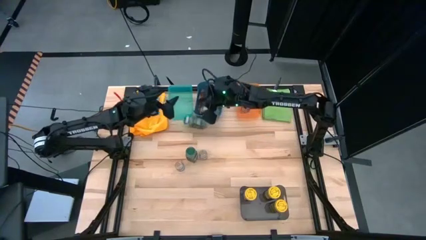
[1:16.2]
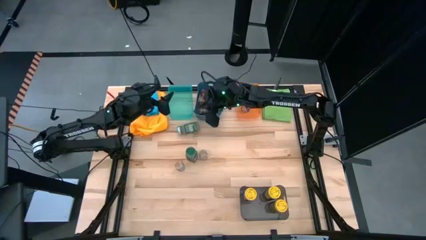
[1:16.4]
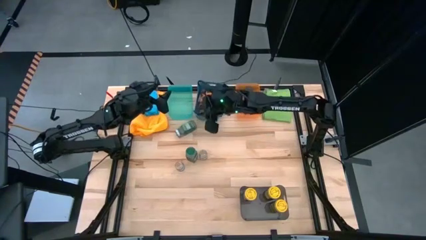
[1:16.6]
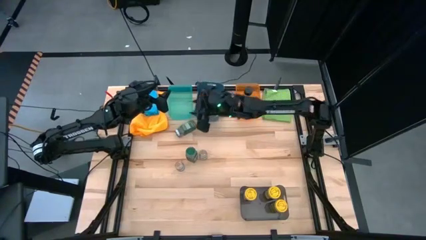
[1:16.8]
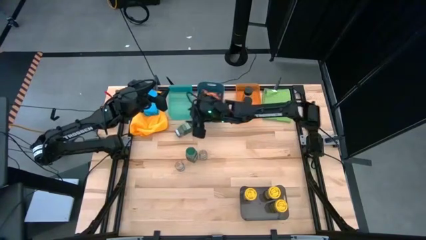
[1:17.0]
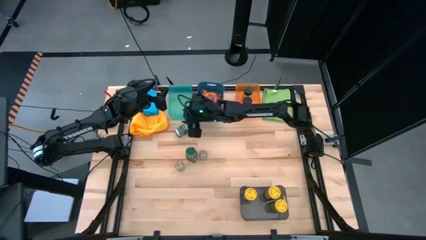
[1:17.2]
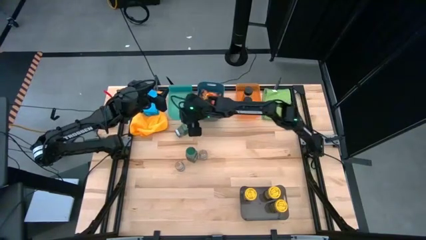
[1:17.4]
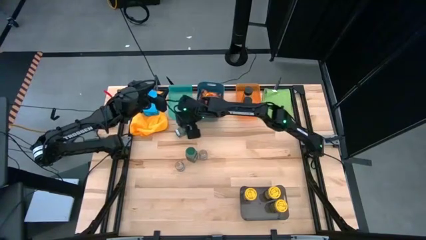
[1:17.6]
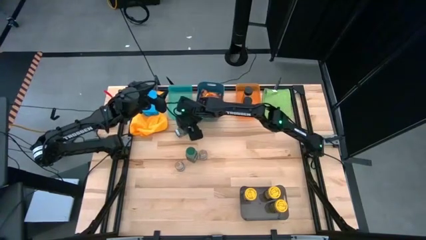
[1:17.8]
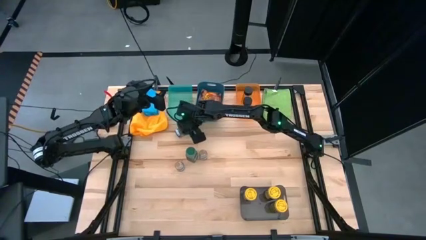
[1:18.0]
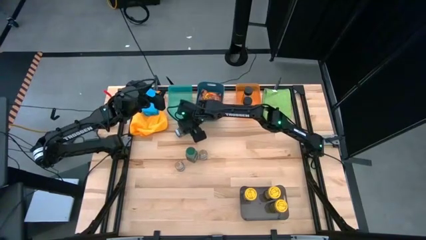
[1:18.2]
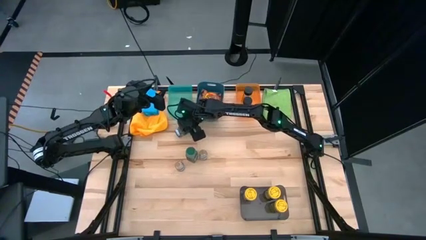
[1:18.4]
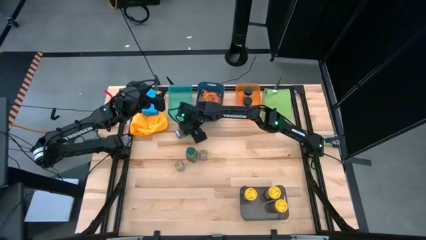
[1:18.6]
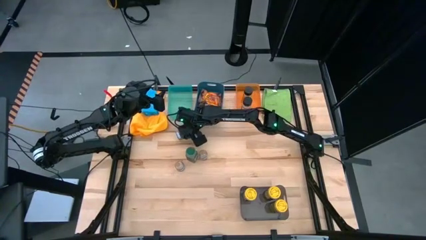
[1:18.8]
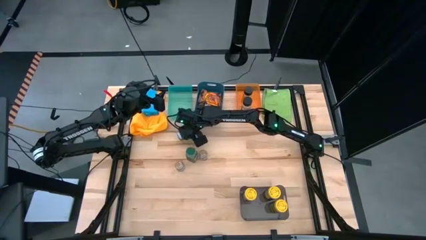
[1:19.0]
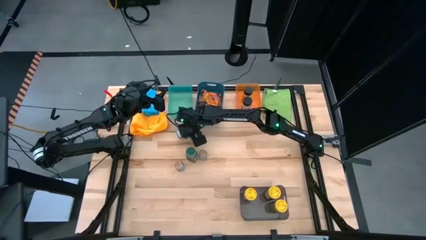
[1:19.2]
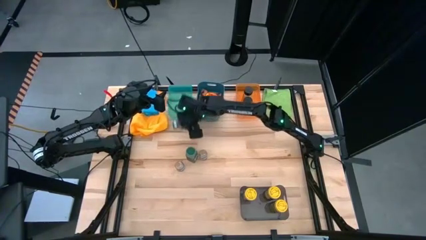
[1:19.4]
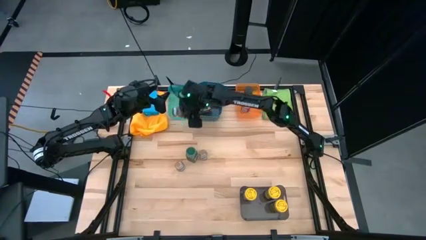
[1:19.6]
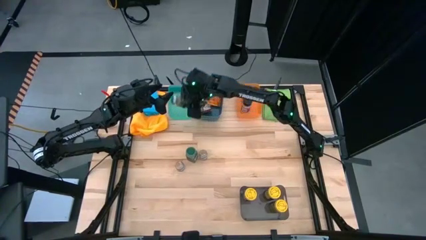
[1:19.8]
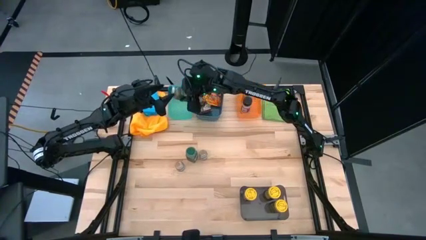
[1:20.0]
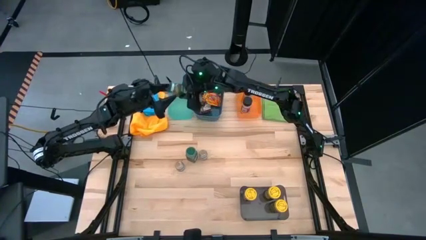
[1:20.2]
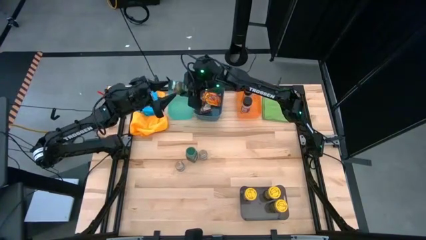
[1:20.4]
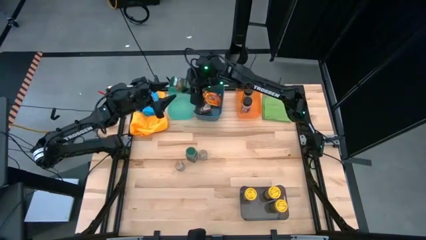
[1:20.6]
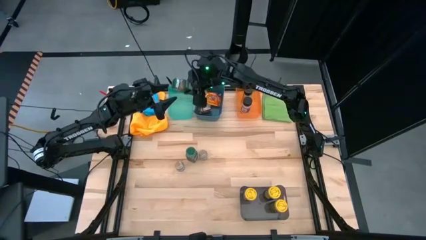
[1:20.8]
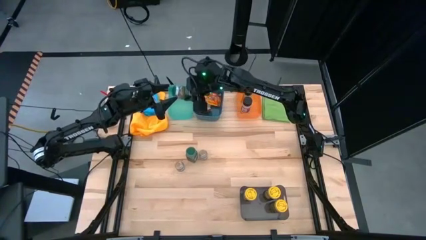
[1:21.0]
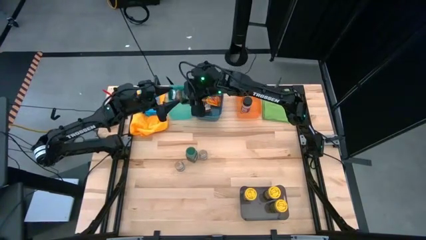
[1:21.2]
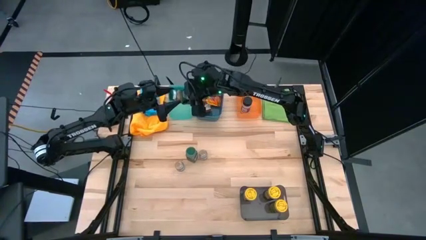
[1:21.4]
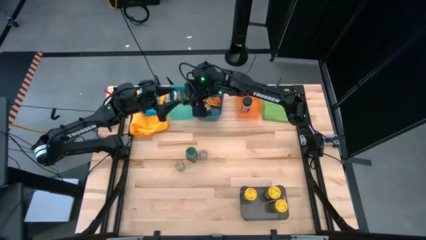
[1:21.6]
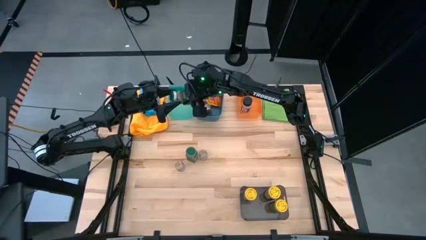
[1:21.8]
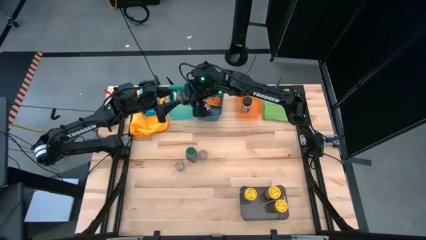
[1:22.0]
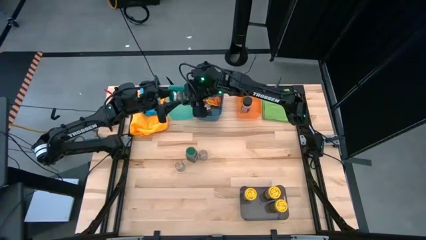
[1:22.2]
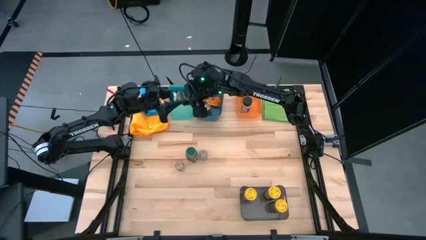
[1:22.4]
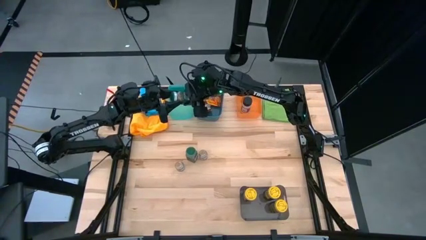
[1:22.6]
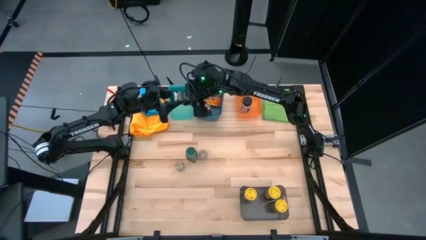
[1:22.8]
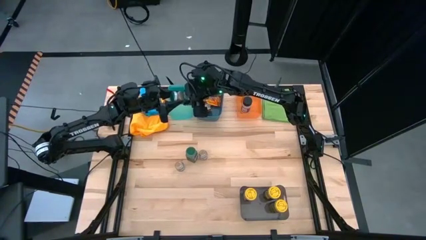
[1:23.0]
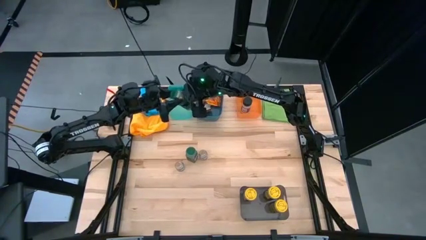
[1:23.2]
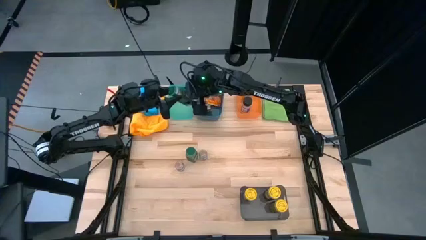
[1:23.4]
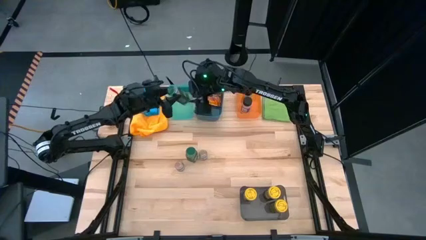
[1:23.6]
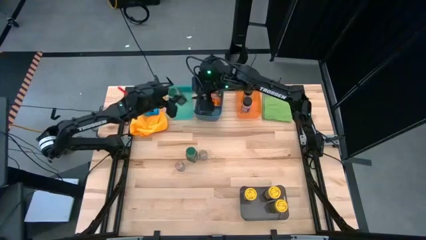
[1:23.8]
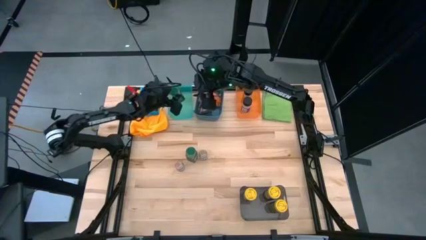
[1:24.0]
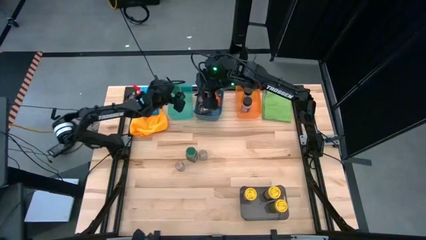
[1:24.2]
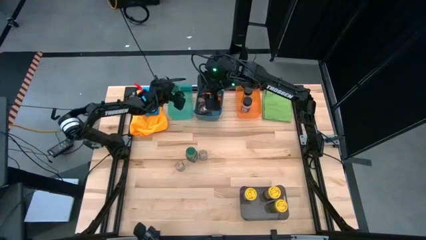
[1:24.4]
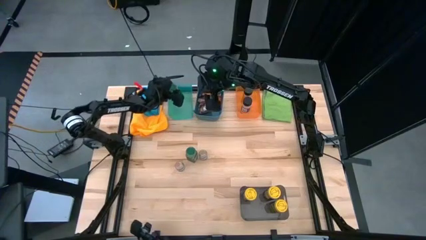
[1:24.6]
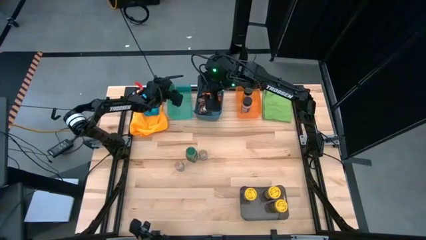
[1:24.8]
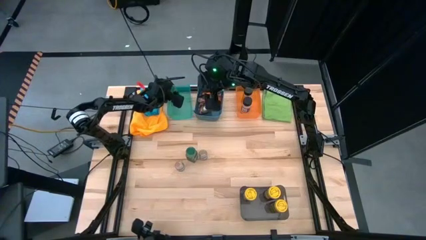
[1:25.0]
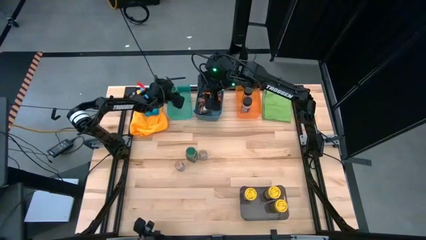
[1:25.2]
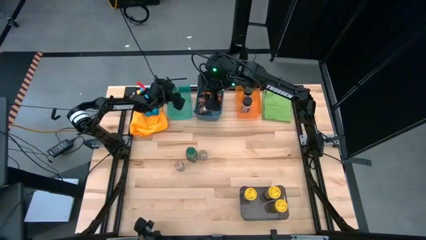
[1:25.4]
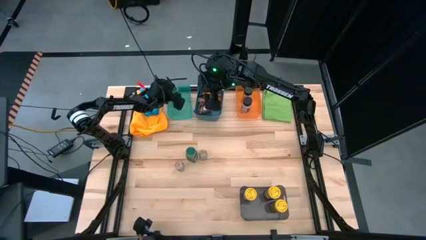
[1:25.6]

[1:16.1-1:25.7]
Task: Sort spices by type
Put the top green seasoning bottle into the blue transparent bin

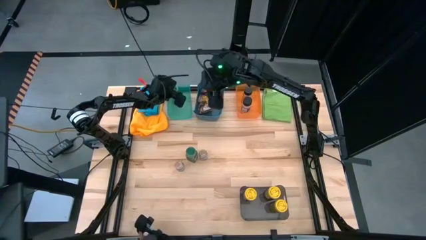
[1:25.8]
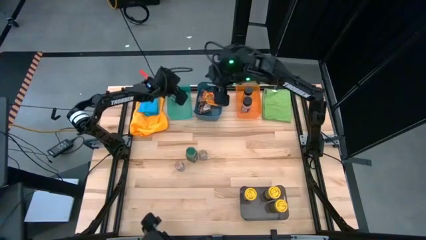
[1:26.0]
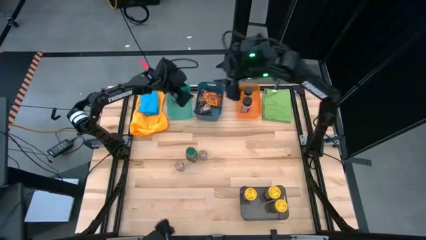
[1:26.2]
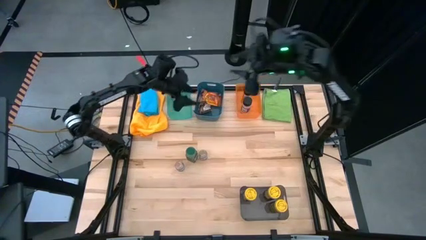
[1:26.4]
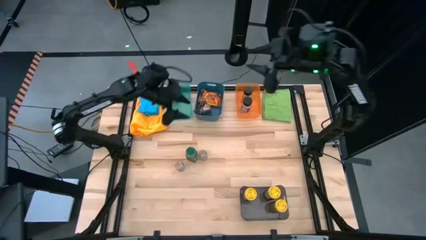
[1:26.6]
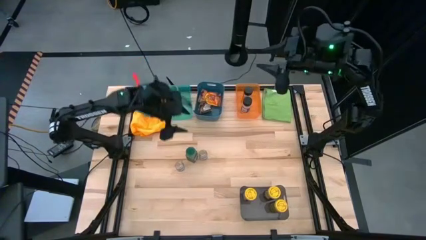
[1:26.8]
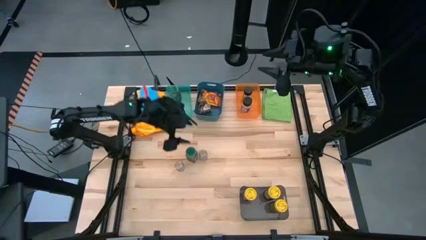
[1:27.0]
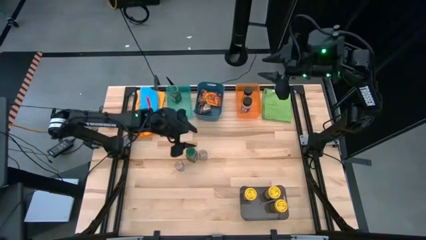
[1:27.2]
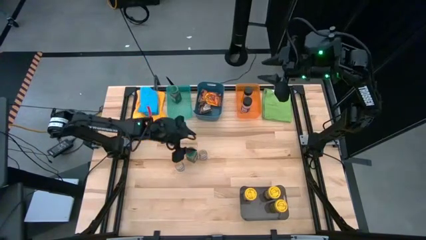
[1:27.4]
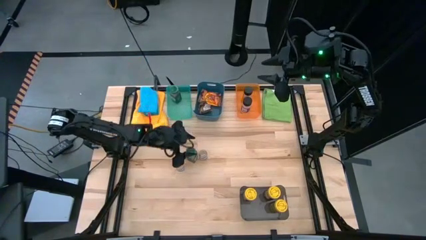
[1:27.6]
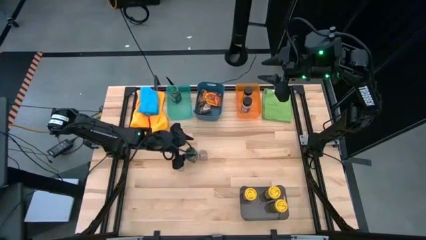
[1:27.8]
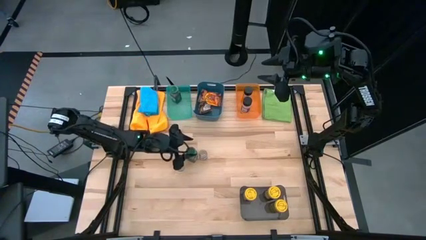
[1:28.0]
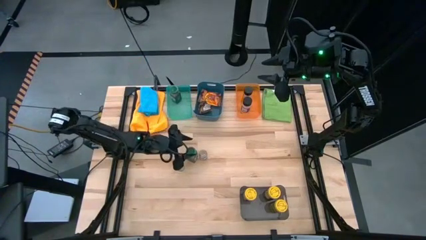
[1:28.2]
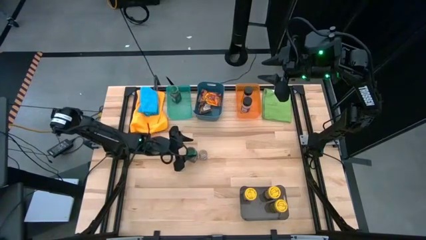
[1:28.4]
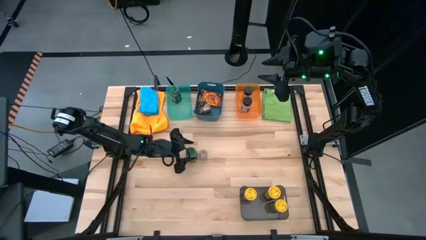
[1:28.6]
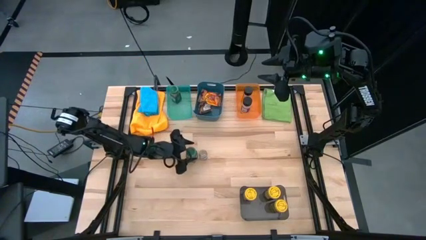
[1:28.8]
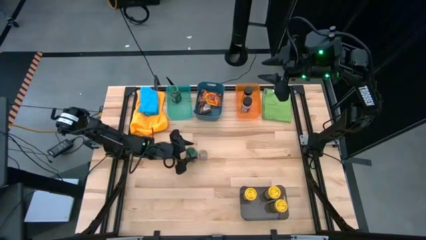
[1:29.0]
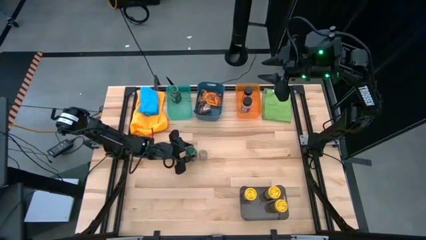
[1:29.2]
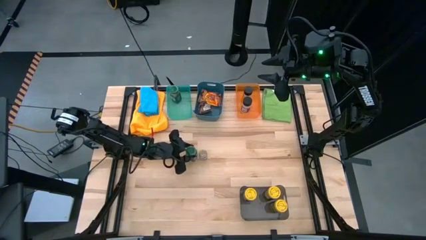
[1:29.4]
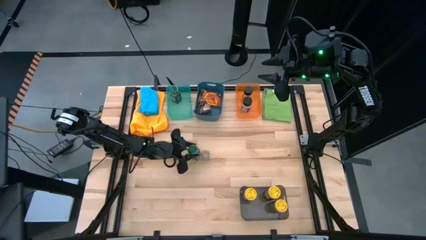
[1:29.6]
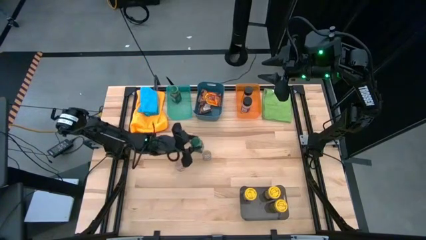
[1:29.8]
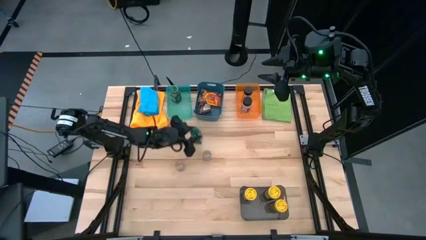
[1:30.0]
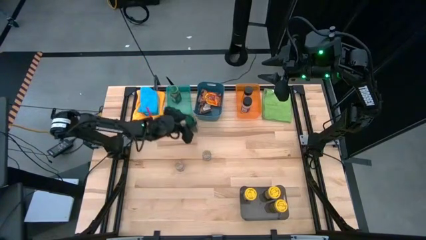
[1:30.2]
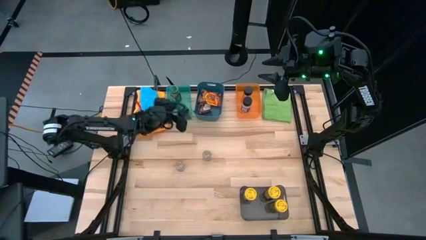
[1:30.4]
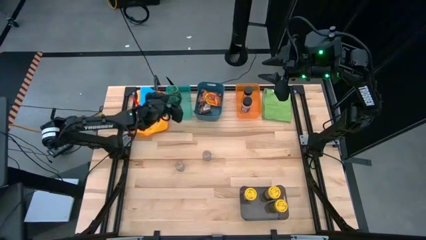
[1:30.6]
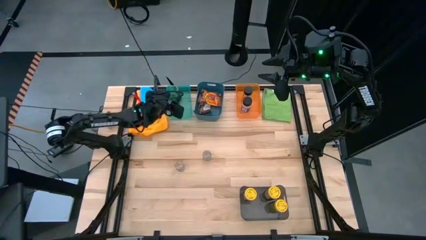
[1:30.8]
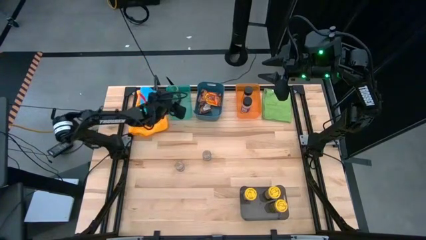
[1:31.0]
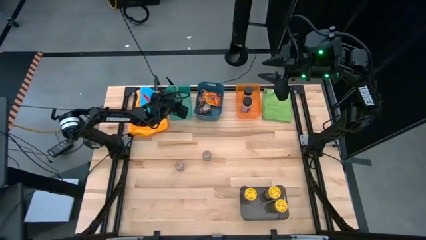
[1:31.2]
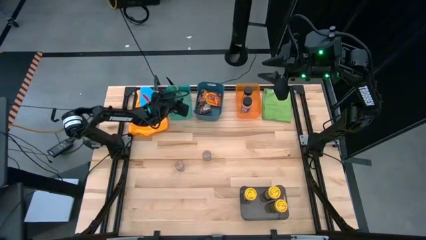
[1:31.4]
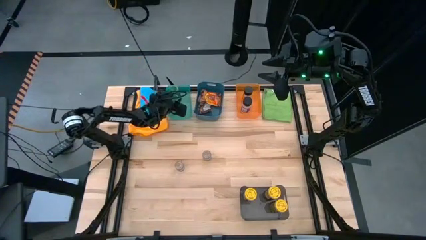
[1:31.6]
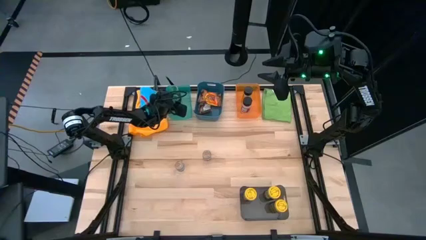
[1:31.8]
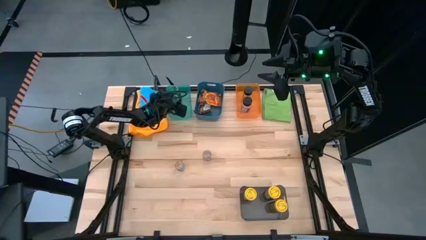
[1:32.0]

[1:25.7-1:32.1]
Put the green seasoning bottle into the blue transparent bin
